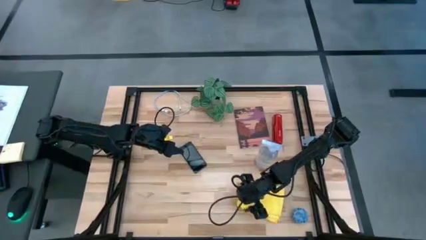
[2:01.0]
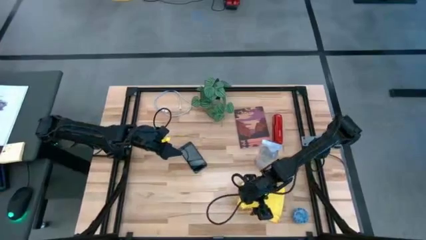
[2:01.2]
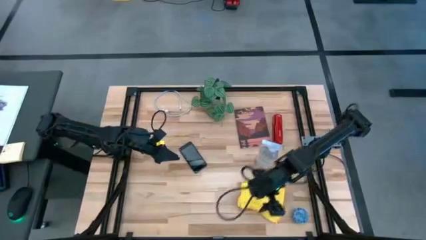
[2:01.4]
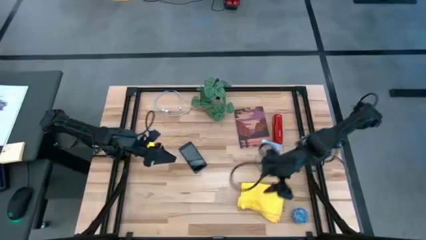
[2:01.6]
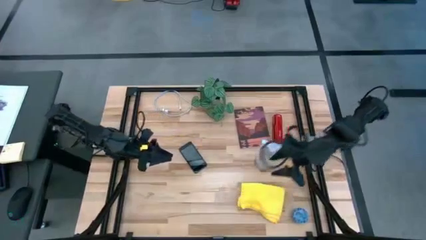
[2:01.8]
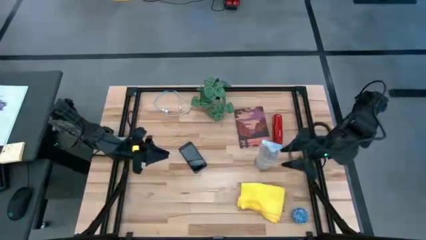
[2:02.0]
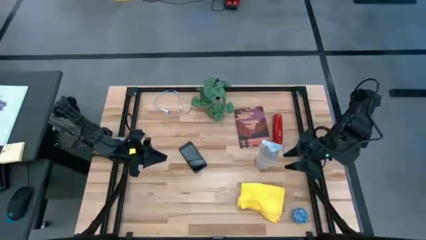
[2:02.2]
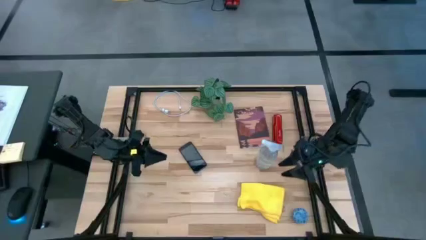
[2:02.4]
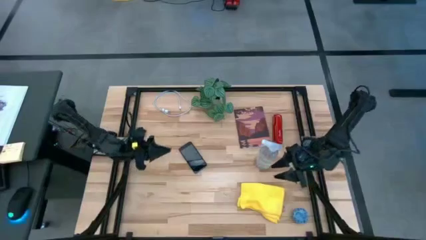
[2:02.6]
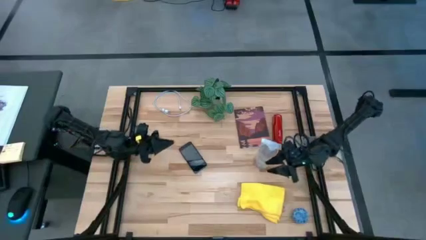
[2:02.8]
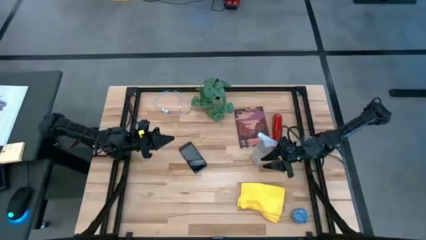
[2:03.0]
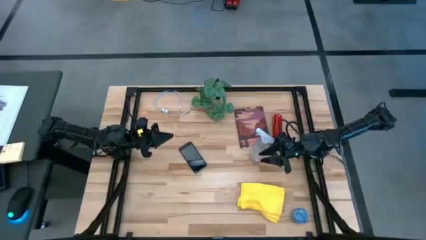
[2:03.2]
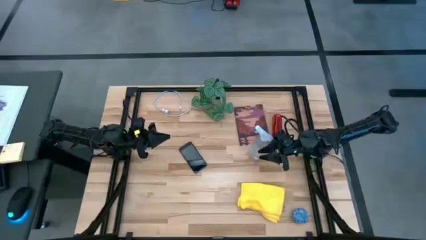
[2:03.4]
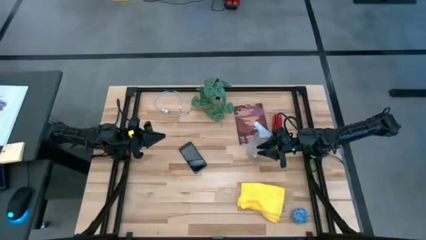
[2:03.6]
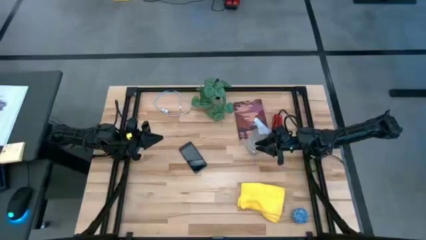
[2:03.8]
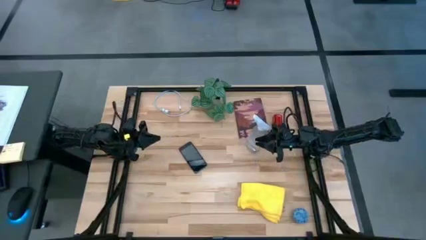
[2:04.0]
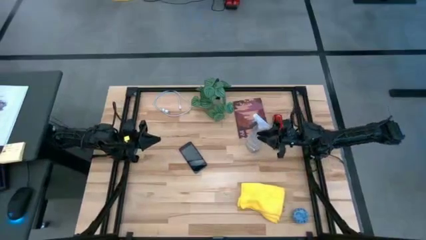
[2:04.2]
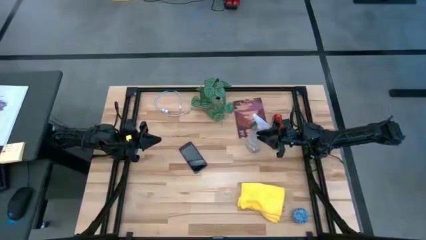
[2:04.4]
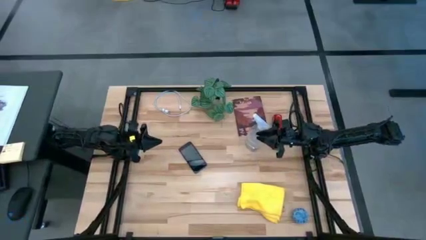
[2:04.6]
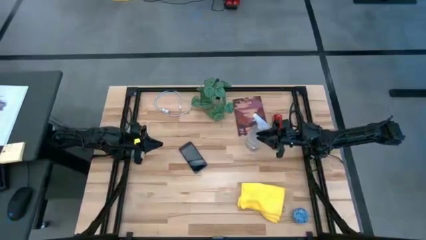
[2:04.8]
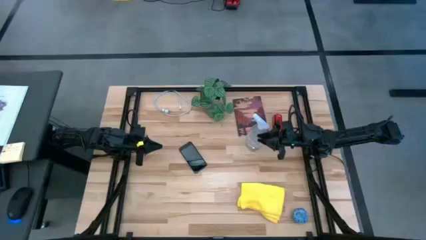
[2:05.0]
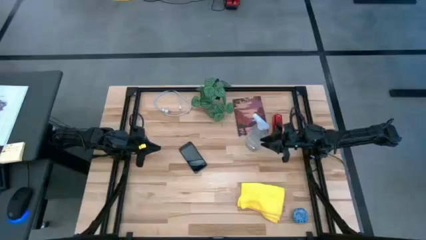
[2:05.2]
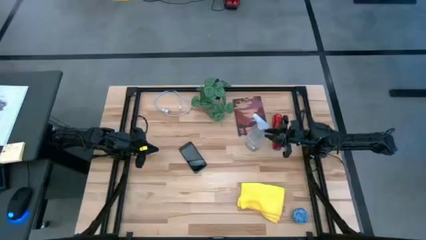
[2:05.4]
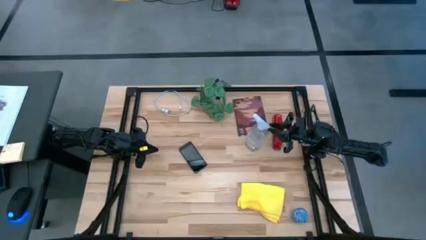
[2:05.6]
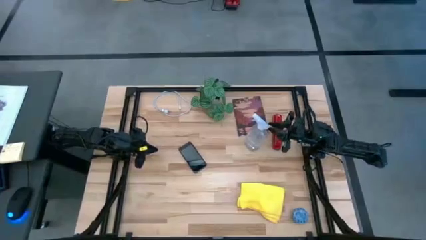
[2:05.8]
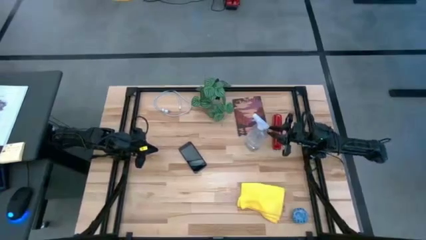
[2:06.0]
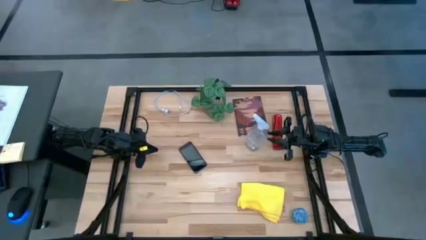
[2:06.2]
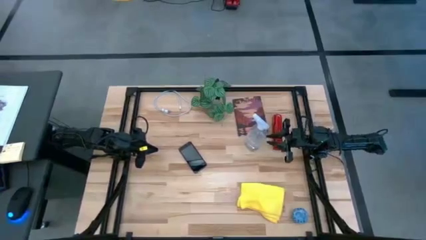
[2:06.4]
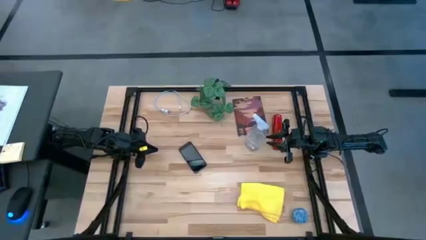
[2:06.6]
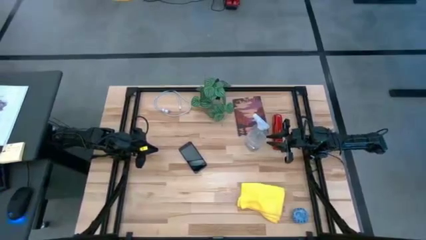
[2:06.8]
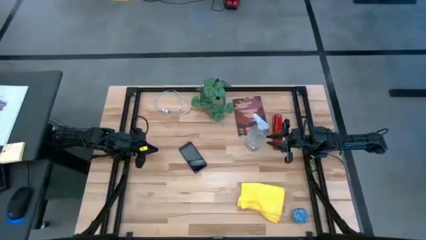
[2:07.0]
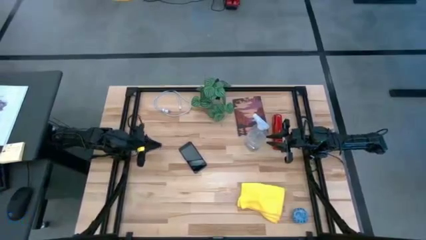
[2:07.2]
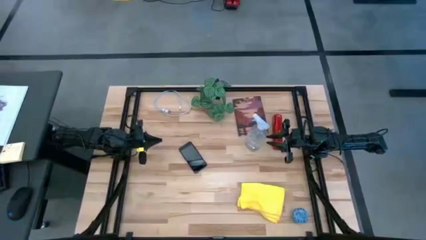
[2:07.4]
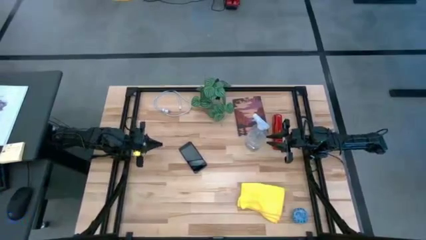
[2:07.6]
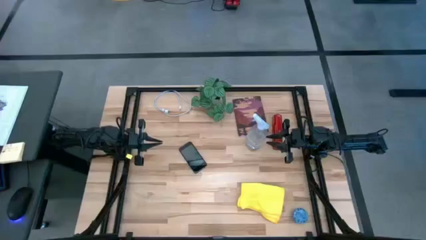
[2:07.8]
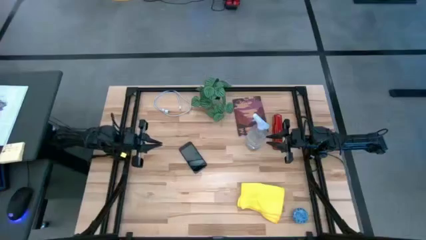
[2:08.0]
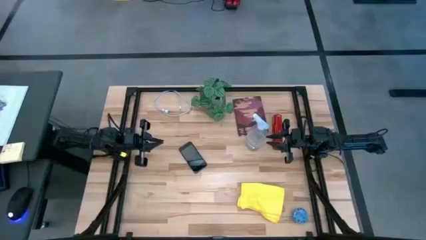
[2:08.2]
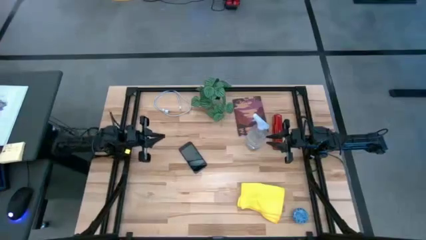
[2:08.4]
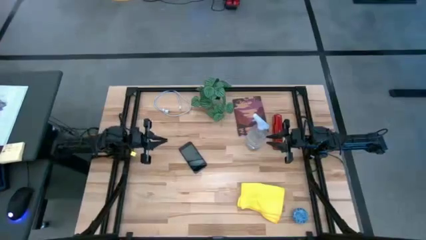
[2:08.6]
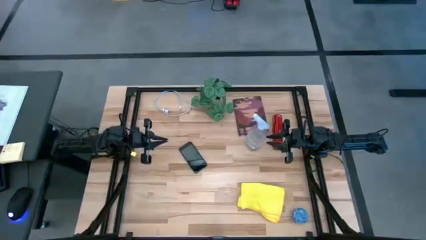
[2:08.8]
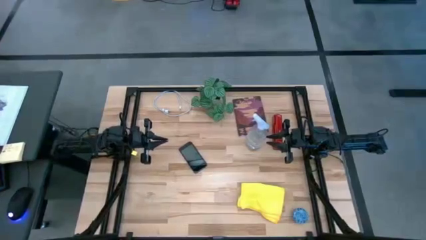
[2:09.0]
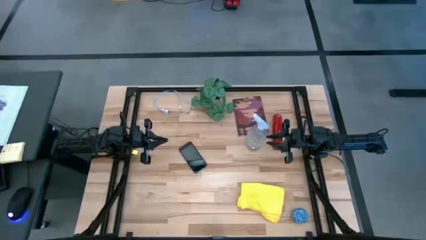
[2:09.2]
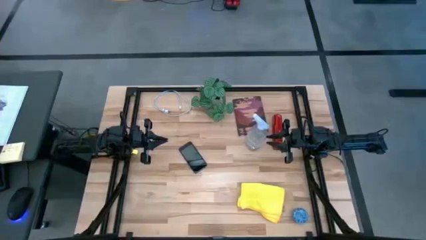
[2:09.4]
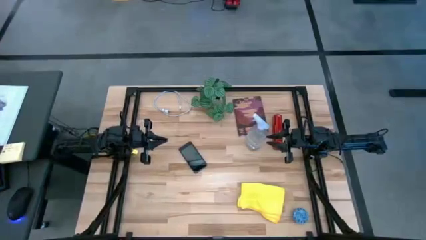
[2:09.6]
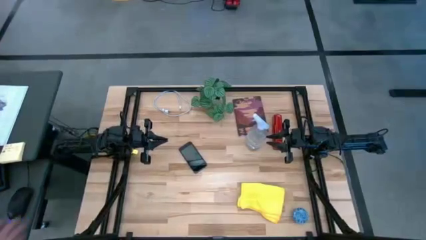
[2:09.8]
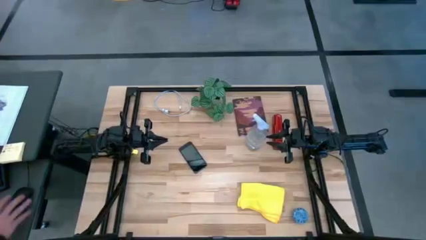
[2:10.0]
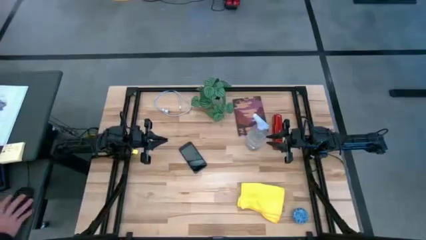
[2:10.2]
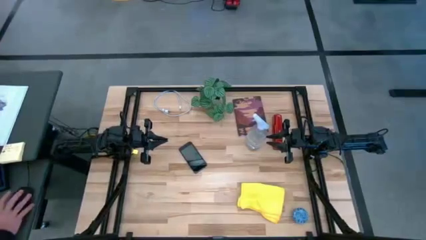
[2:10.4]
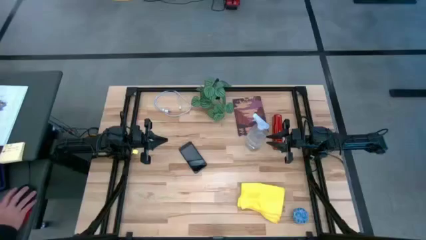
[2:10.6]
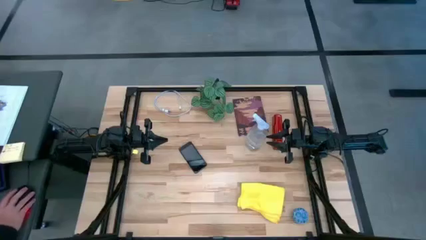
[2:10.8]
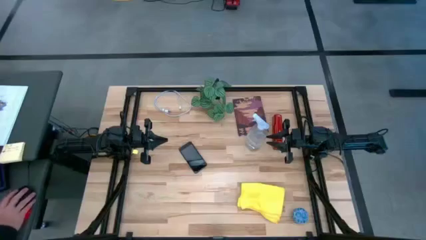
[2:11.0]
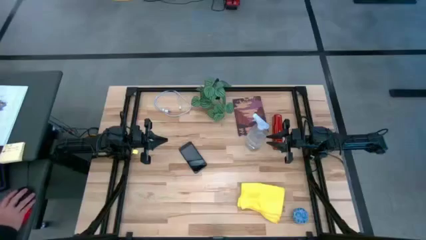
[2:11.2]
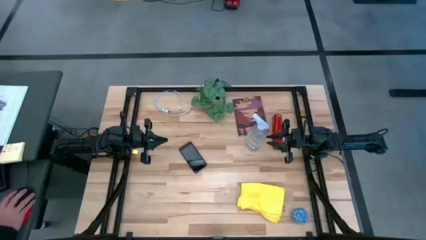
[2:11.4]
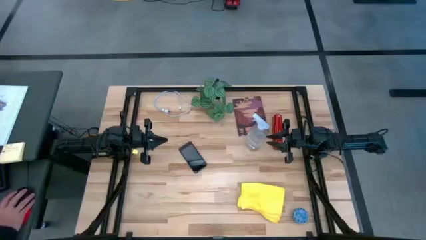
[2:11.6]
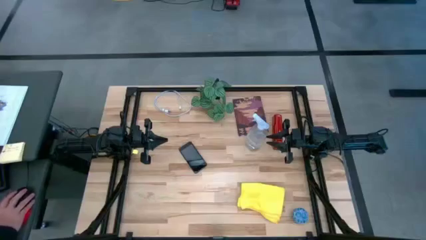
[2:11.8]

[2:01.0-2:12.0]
Task: Apply microfiber cloth
Return to home position

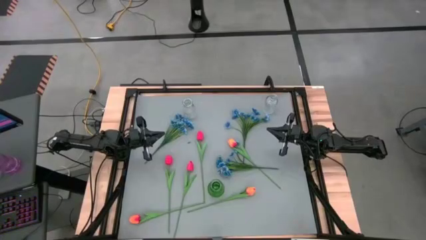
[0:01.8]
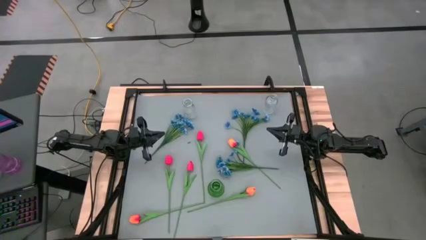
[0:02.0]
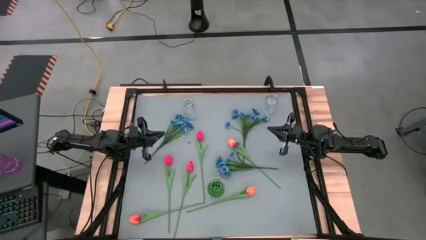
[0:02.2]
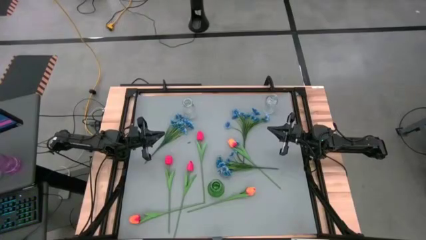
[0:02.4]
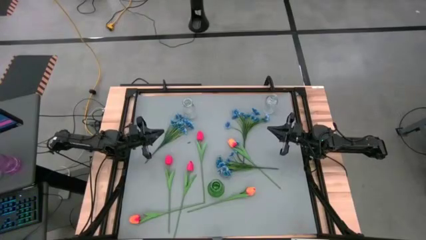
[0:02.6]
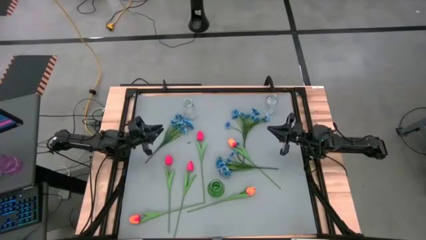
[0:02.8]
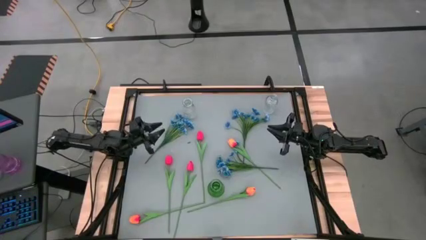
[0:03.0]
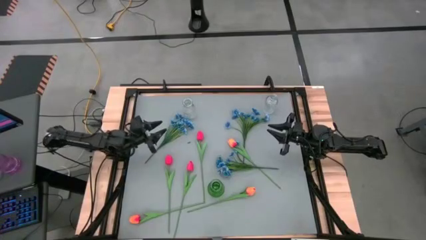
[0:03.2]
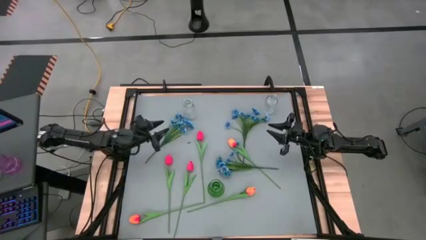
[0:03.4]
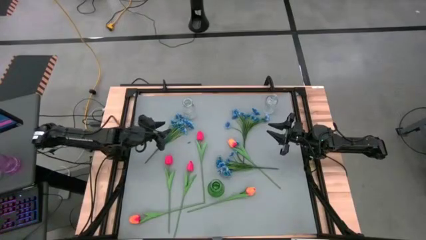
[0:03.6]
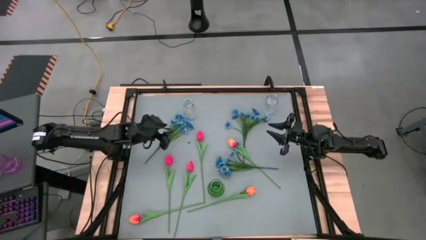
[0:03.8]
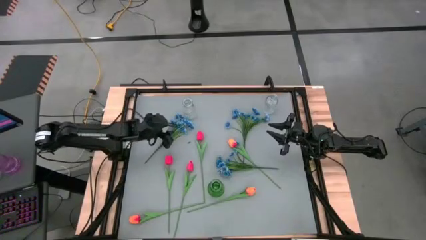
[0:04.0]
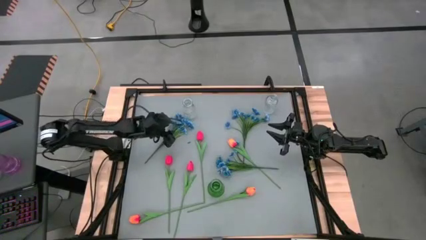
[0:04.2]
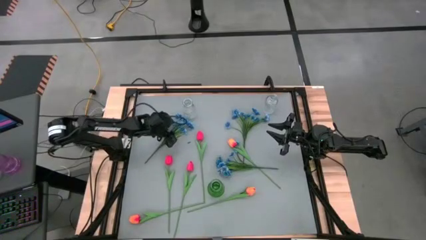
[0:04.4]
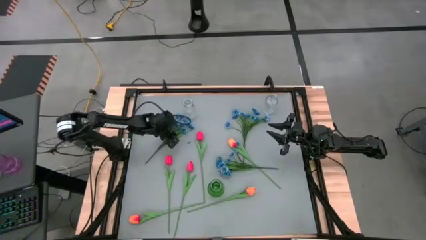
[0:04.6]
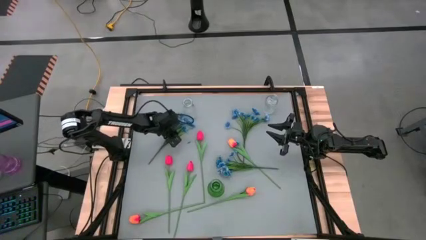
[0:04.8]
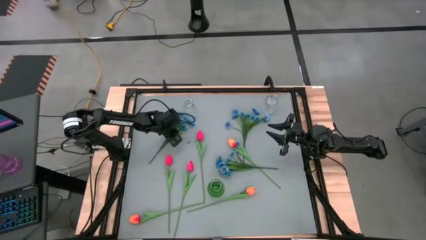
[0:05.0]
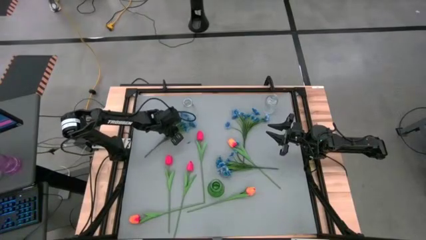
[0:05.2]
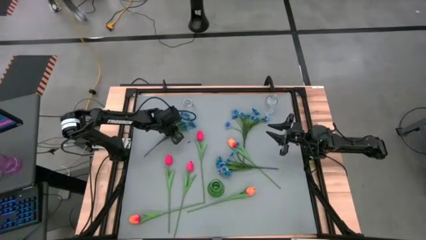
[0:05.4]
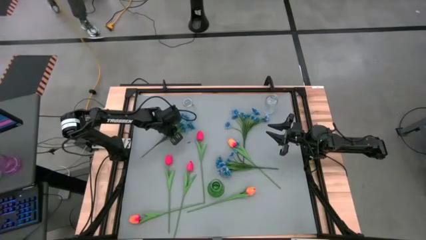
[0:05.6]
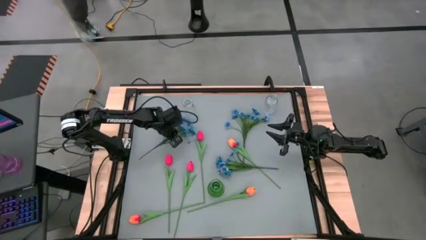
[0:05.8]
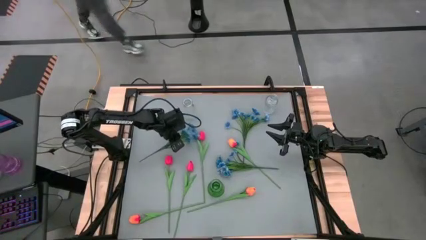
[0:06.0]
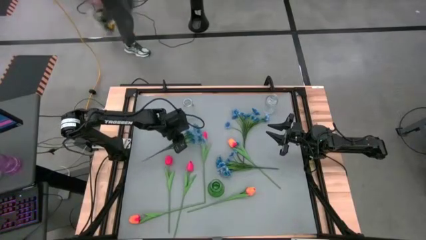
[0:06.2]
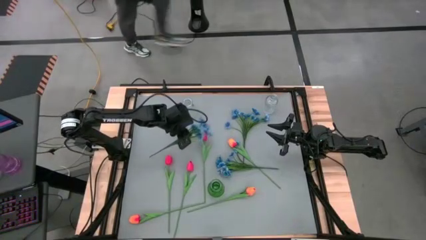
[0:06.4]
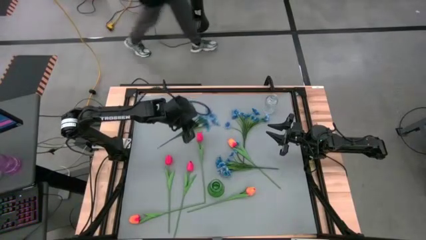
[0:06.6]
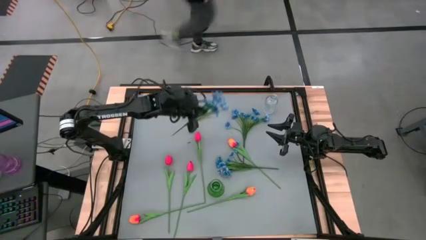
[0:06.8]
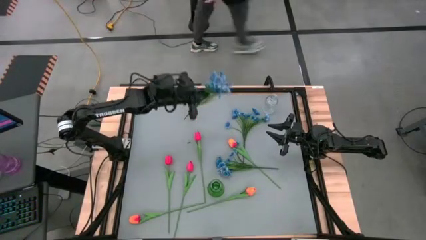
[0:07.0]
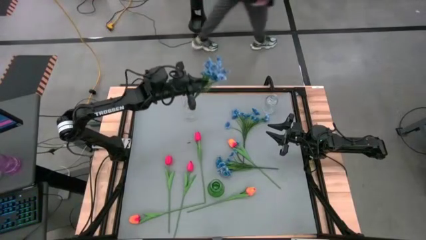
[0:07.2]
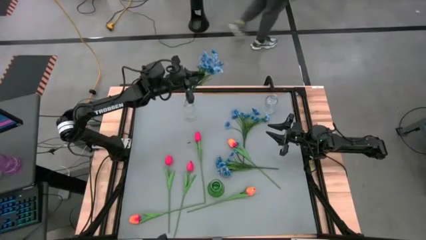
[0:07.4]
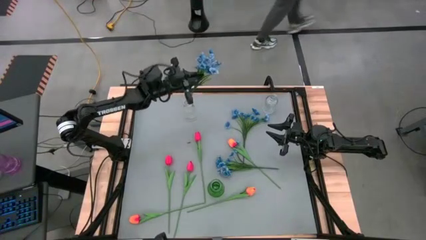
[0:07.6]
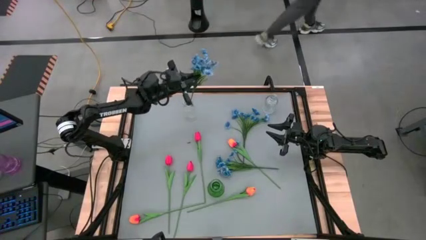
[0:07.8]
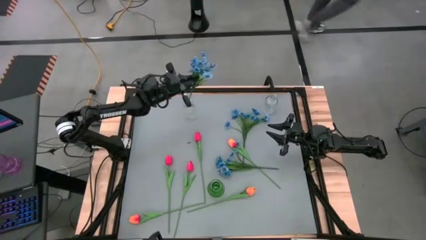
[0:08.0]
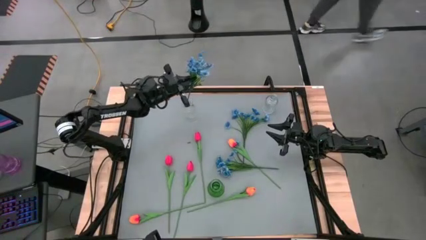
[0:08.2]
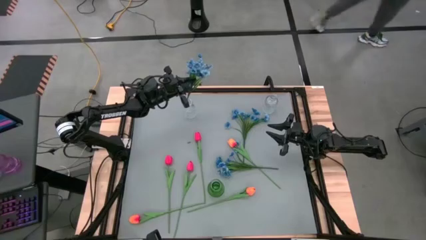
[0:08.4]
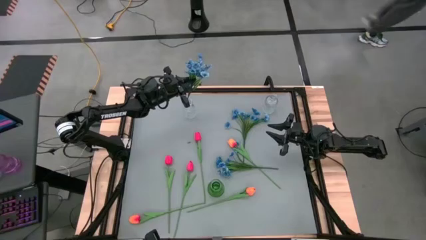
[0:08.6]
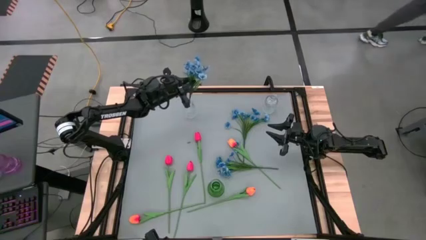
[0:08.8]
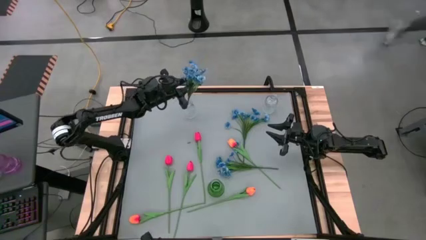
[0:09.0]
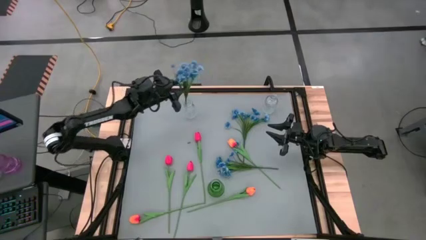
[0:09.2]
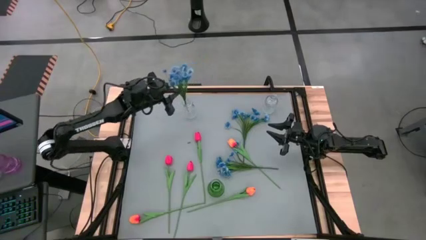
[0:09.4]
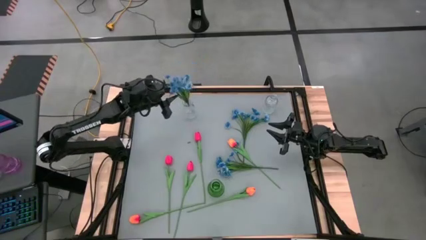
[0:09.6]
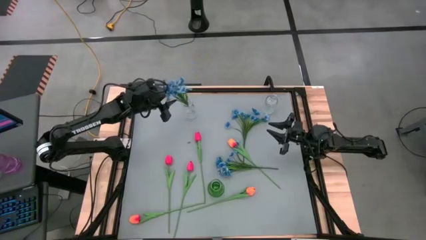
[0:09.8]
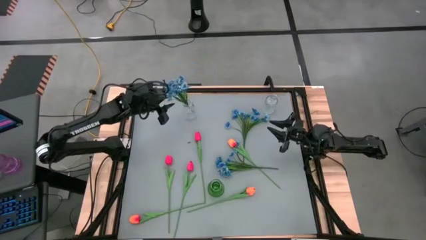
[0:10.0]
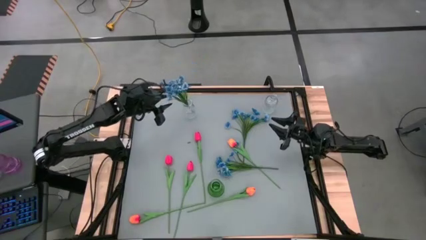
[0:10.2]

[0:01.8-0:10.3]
Task: Sort flowers into vase by color
Put the top left blue flowers into the top left transparent vase
